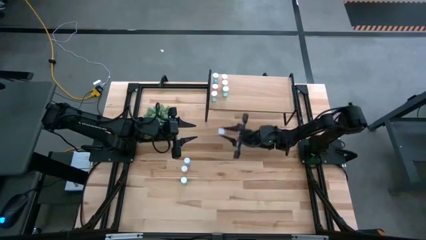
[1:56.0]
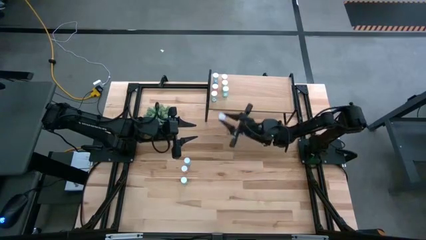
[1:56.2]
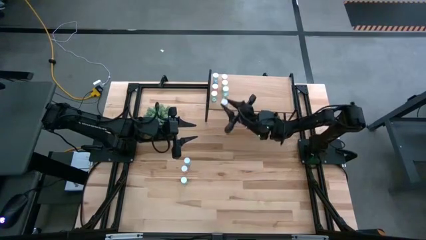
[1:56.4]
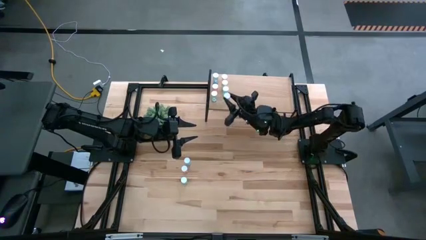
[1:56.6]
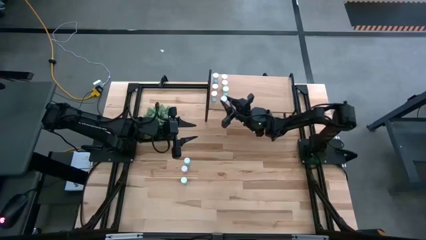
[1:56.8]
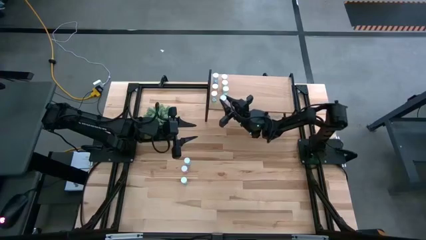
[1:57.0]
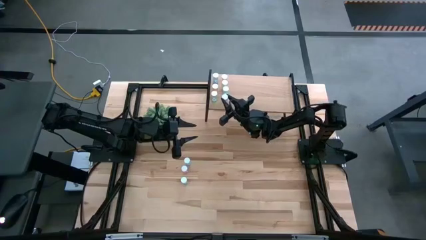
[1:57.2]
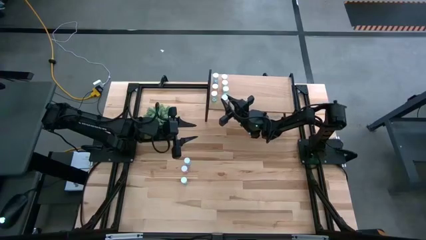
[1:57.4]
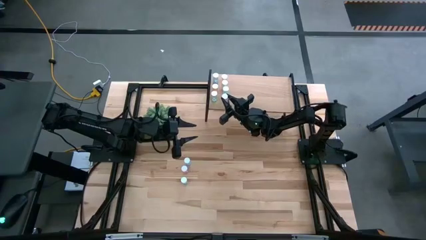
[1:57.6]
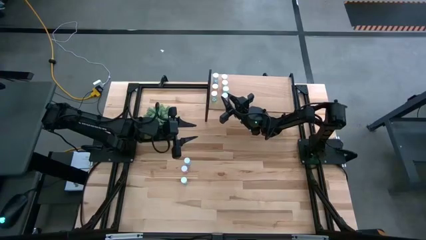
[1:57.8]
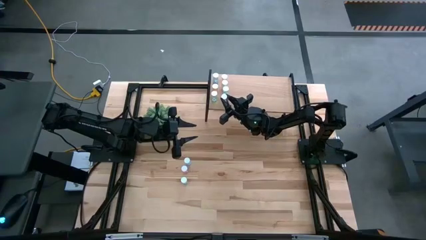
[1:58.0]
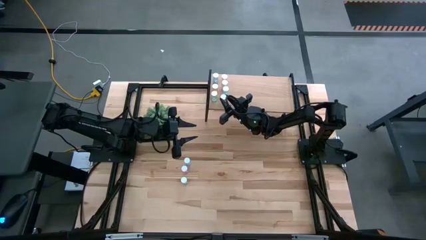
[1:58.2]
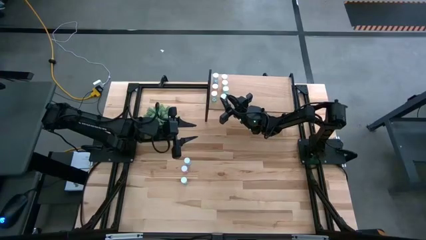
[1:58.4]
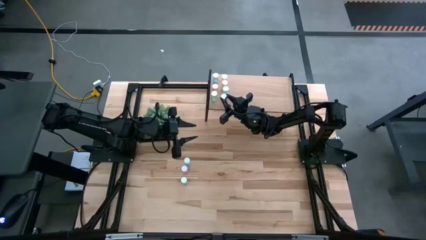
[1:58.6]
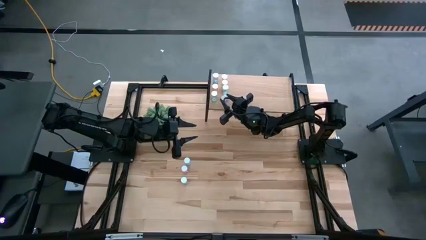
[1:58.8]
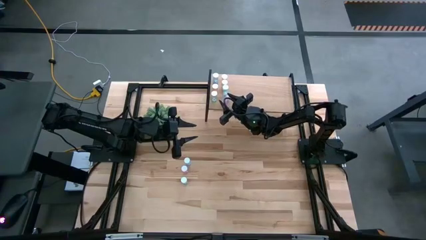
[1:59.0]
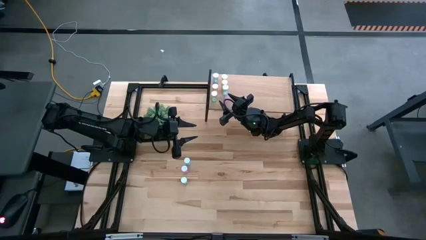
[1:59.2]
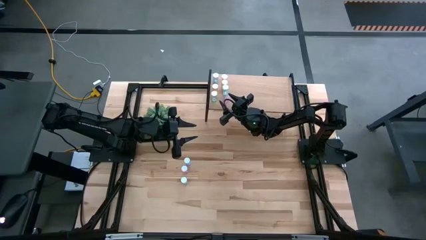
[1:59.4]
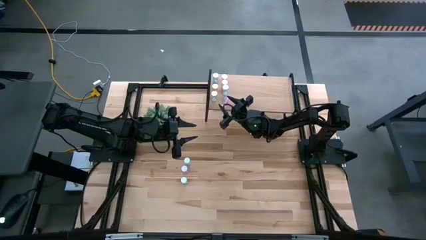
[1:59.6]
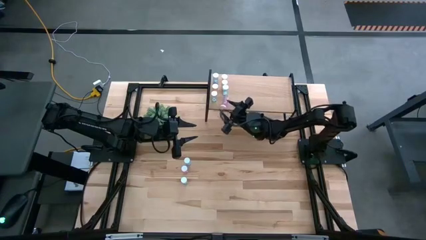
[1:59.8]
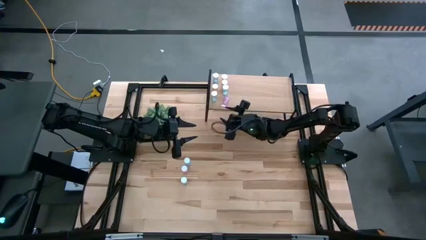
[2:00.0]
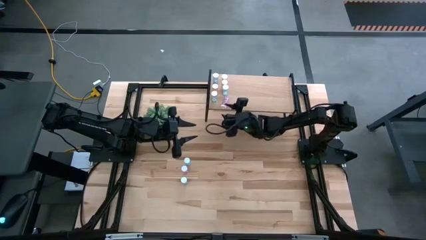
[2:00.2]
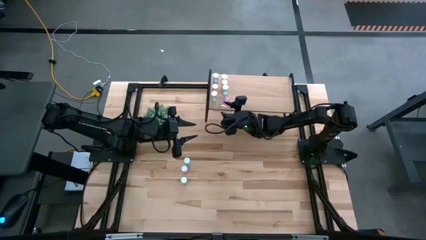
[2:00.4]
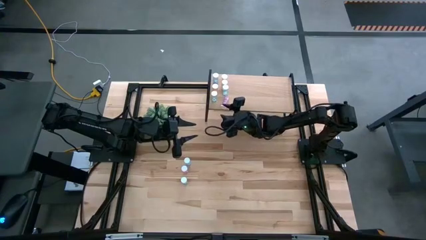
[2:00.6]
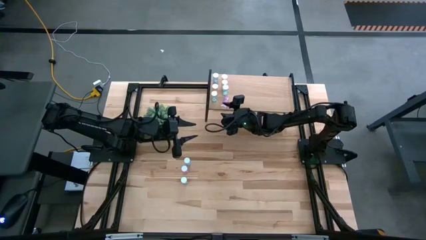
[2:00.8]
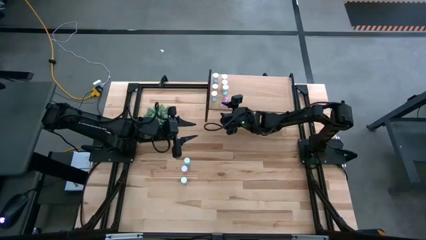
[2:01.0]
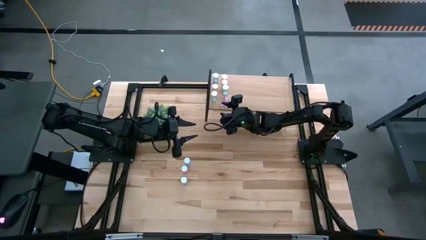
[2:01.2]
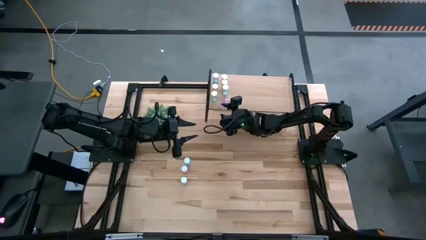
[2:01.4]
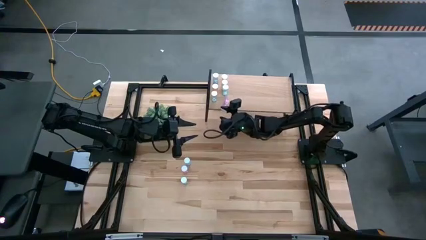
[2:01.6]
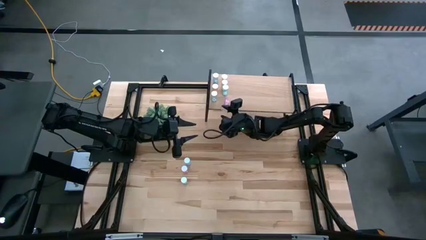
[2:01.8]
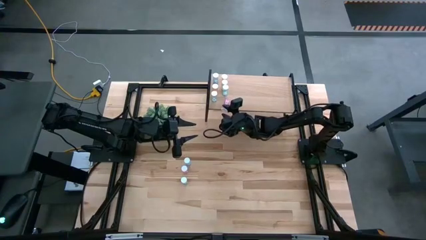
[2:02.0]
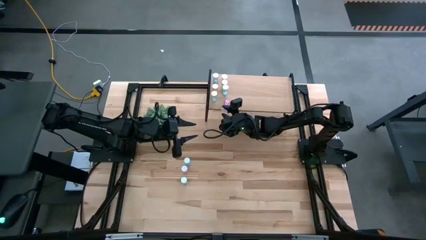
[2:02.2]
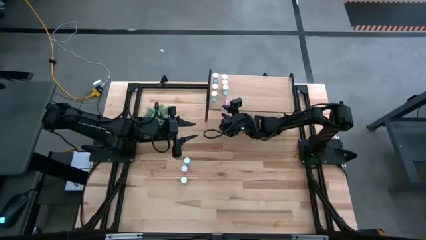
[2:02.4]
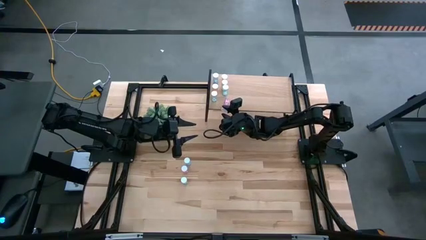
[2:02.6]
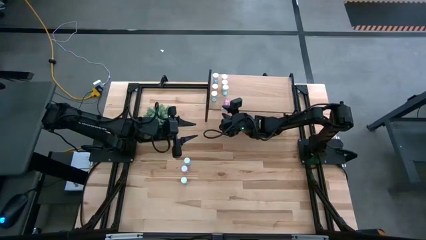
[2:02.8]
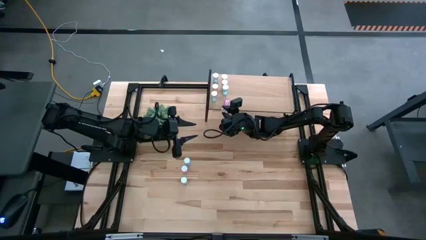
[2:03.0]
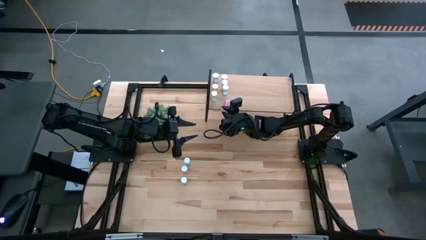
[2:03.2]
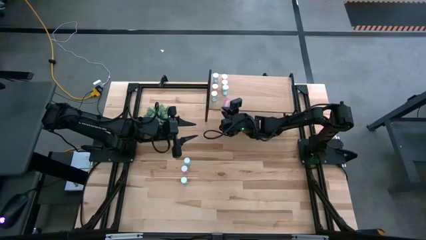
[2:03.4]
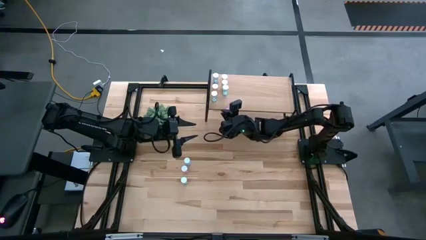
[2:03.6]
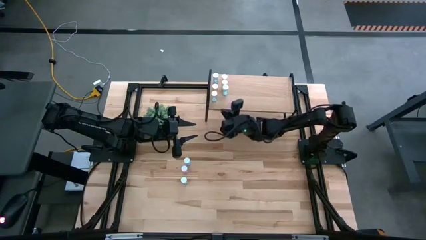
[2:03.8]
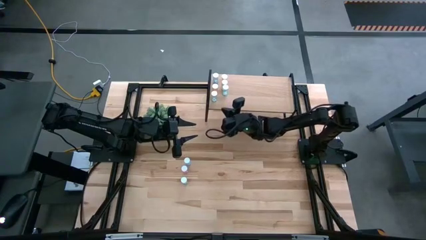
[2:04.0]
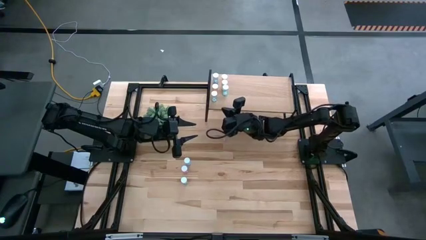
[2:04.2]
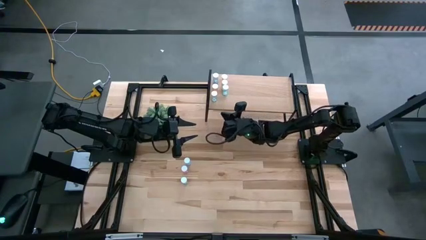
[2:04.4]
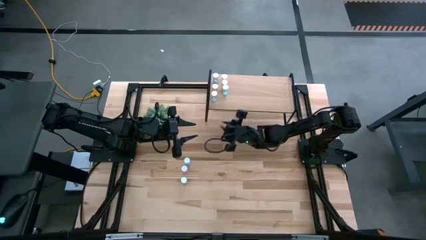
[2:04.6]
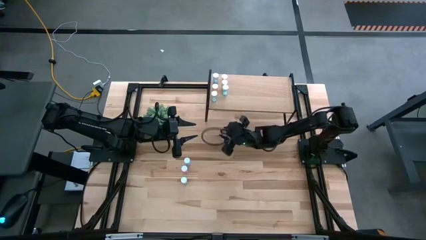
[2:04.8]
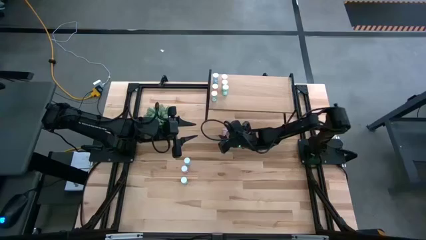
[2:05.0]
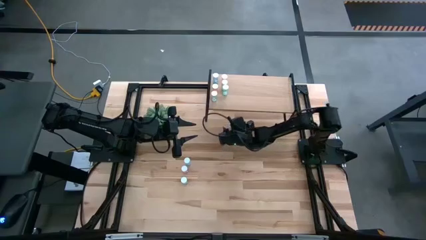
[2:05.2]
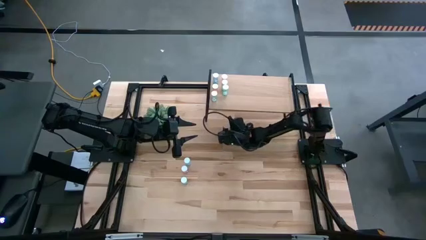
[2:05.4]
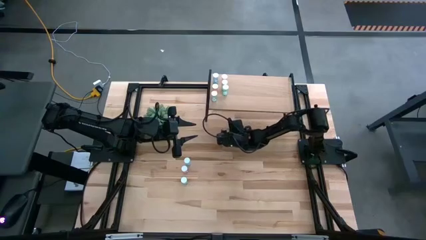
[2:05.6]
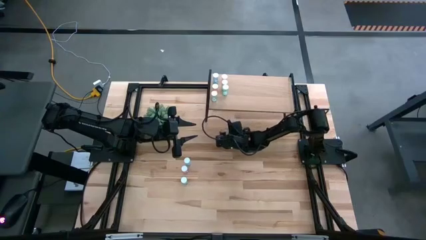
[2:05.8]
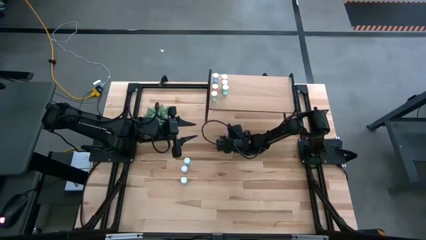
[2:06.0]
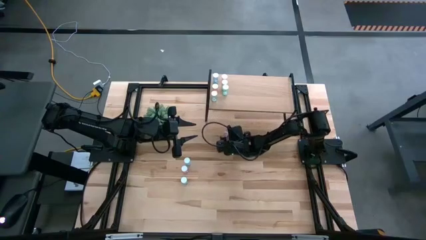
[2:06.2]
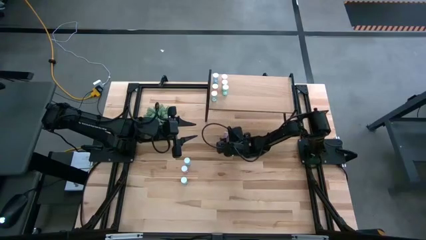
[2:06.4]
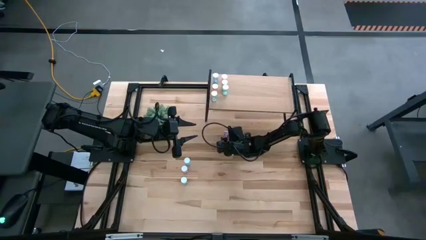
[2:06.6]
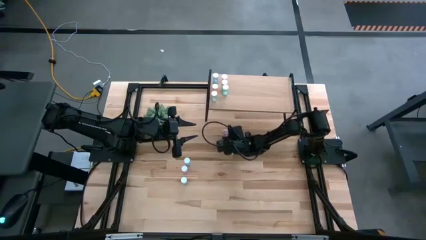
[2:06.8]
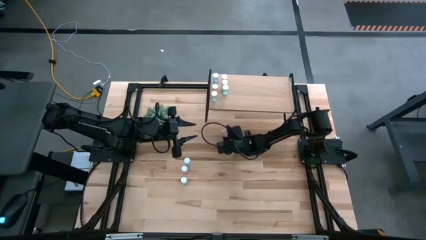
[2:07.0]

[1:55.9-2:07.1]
Task: Pick and place medicine bottles onto shelf by color
Put the transparent pink medicine bottle on the shelf

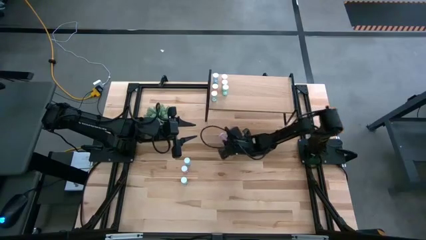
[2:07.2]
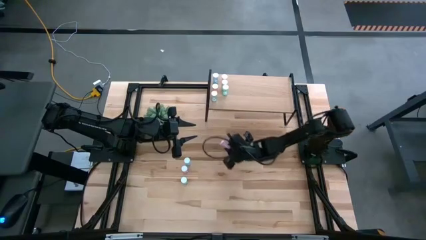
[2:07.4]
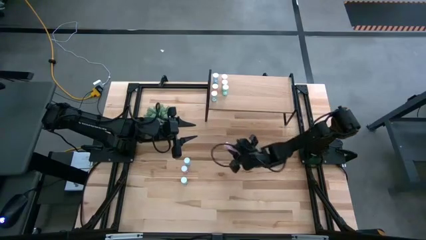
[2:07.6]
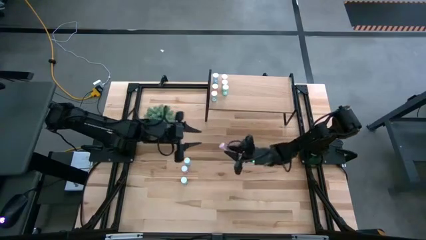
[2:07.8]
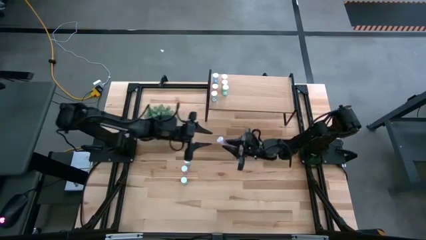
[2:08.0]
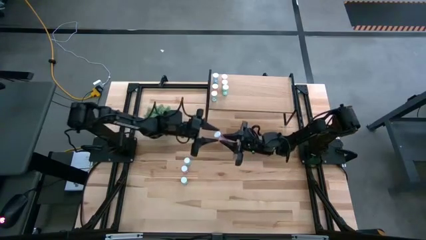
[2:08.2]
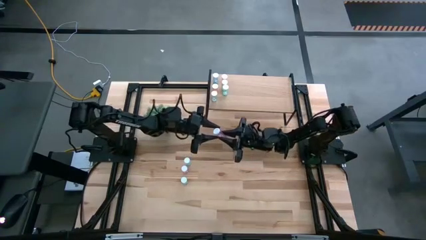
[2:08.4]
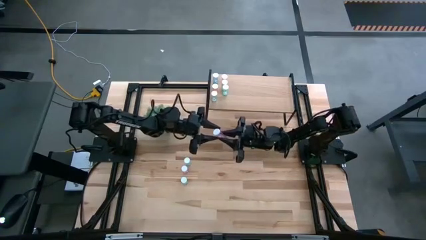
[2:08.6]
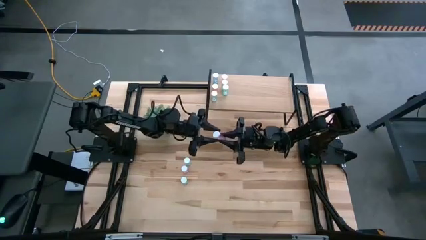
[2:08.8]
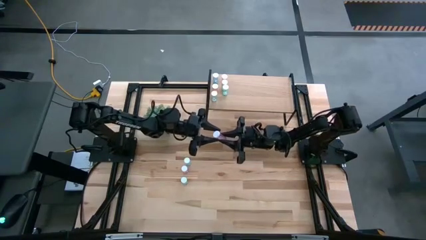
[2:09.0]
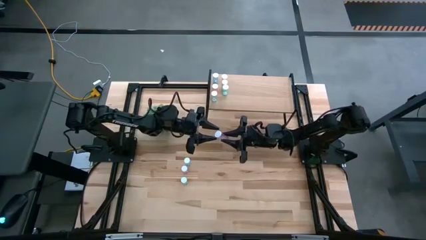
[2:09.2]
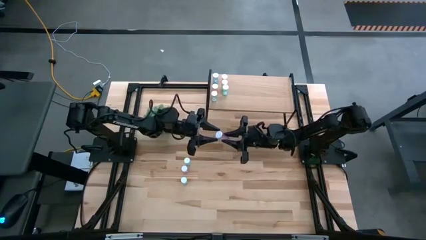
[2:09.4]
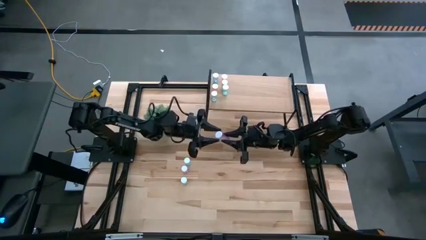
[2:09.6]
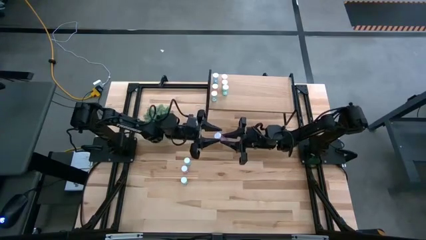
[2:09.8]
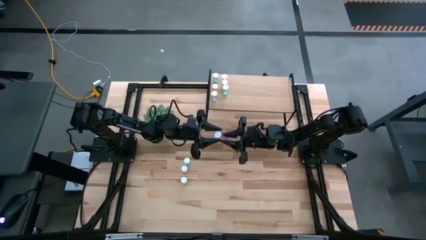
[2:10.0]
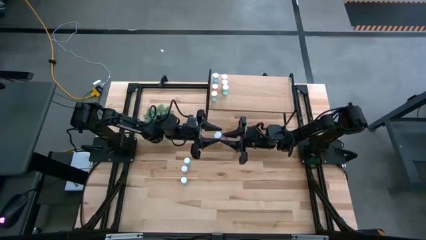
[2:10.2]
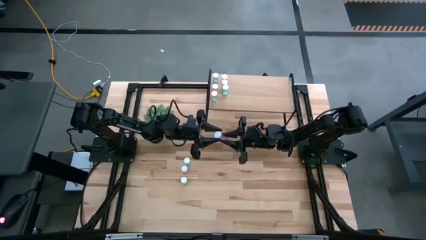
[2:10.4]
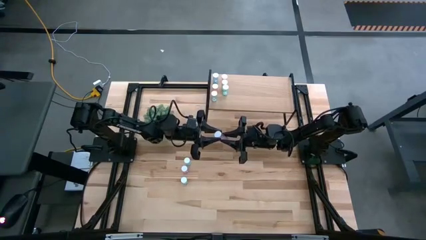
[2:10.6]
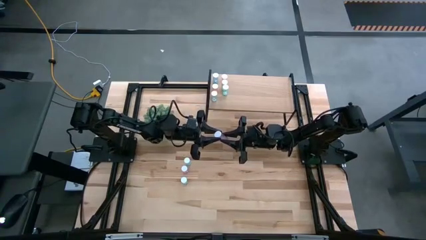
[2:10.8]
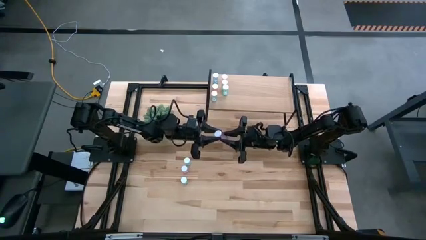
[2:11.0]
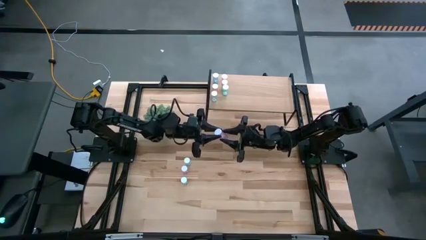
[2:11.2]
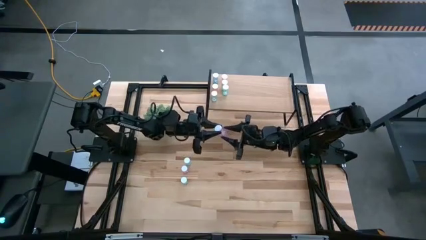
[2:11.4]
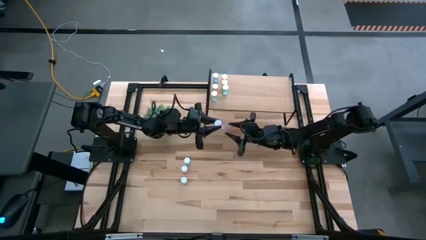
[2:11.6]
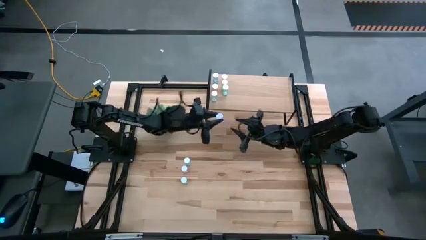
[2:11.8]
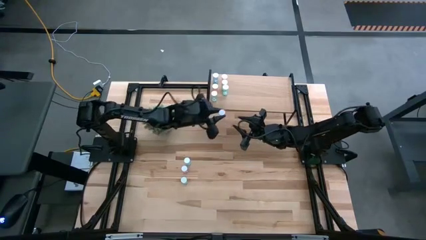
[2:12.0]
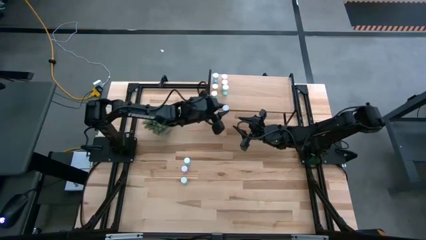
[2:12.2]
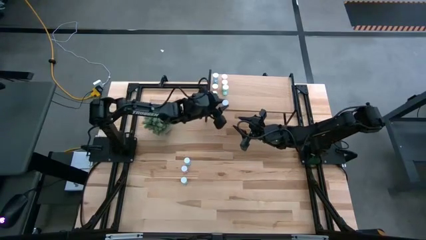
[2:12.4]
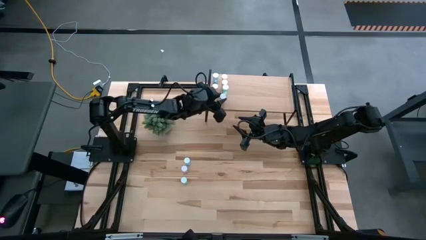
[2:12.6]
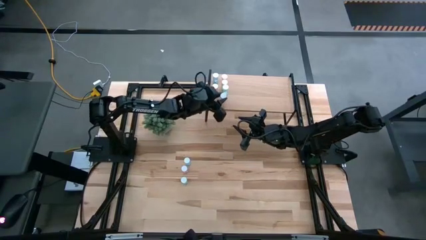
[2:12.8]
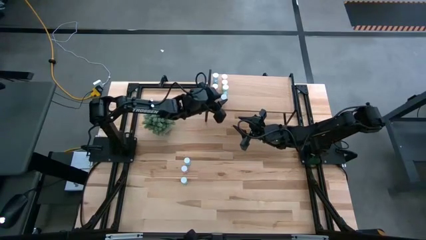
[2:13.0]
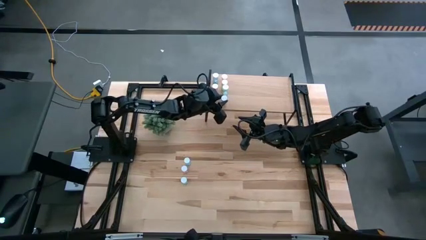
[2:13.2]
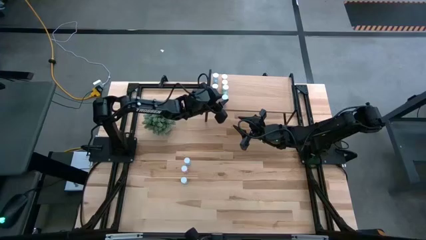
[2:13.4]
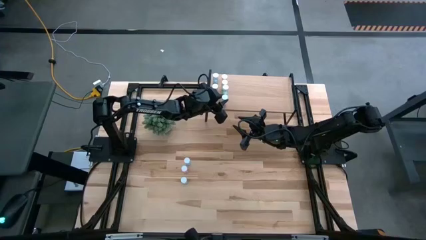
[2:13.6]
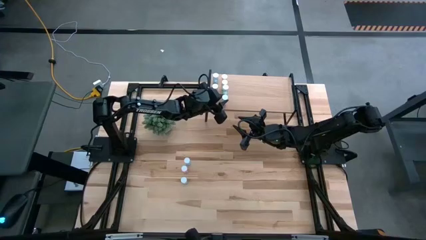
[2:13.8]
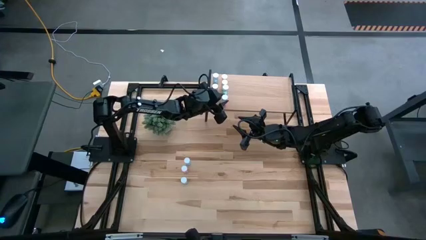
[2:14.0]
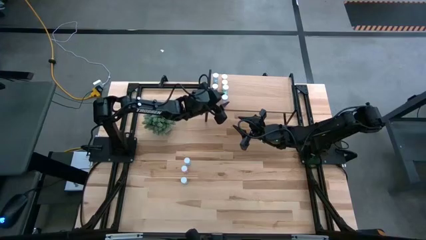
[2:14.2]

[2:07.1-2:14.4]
Put the transparent pink medicine bottle on the shelf
